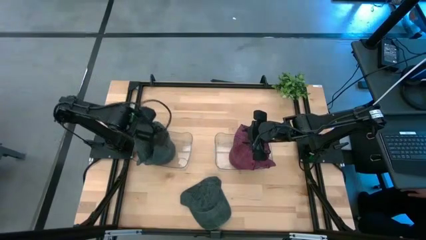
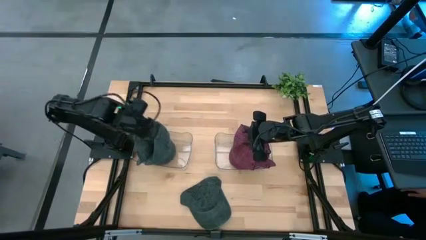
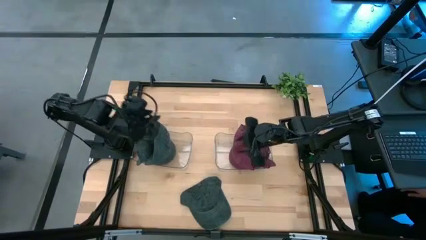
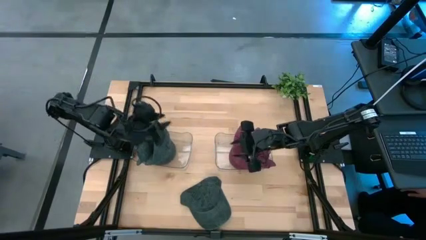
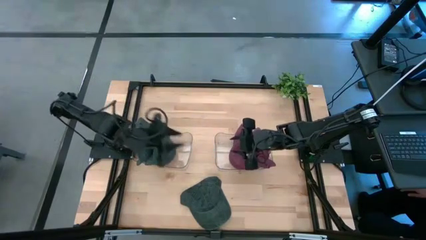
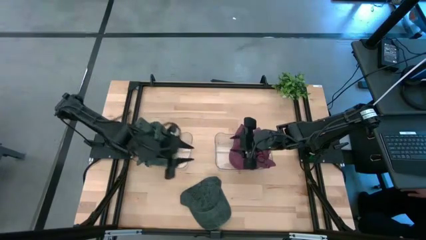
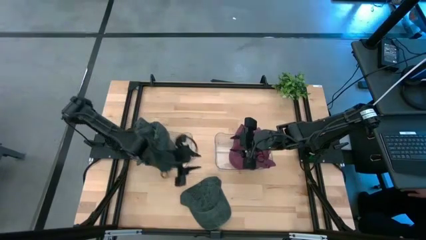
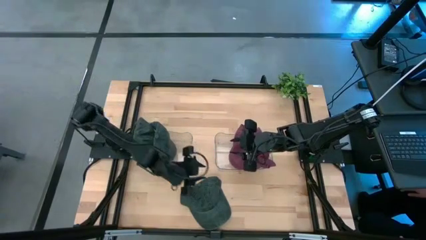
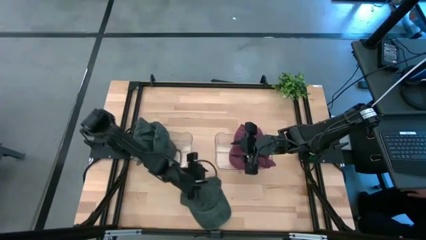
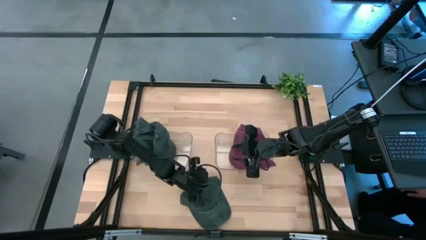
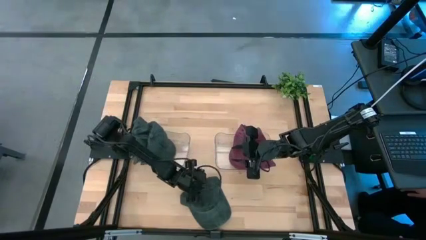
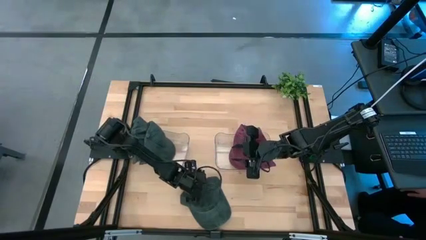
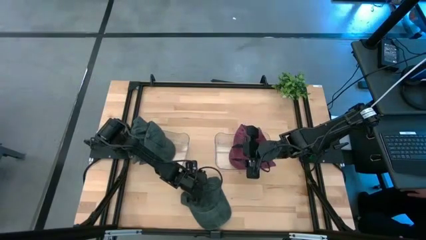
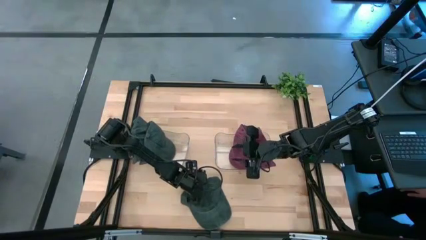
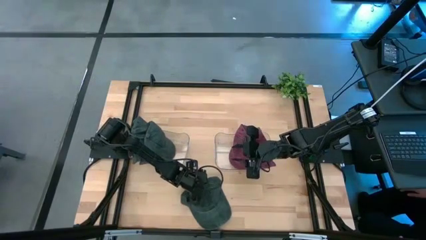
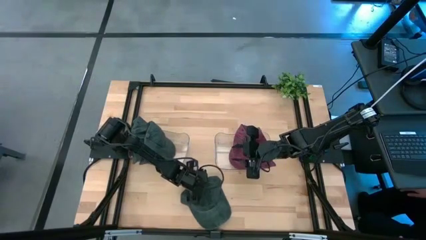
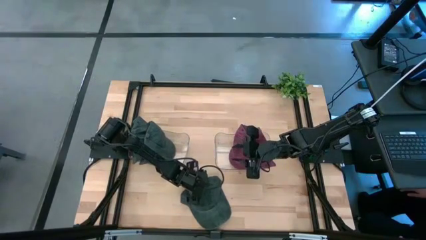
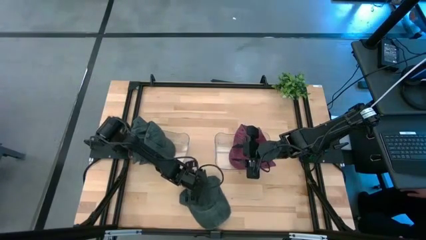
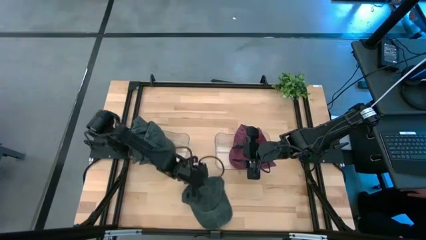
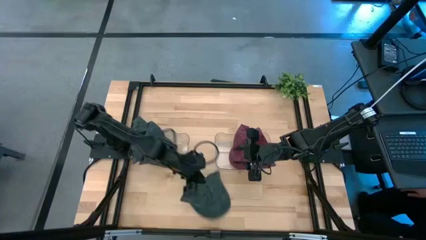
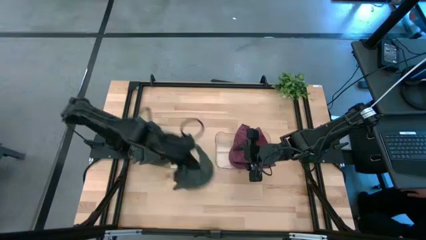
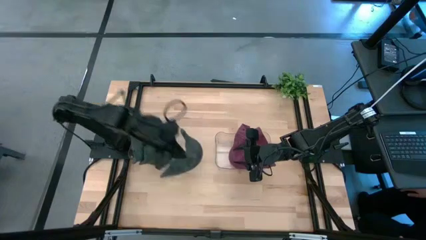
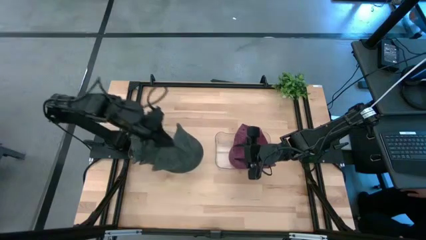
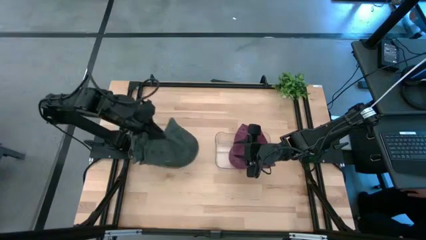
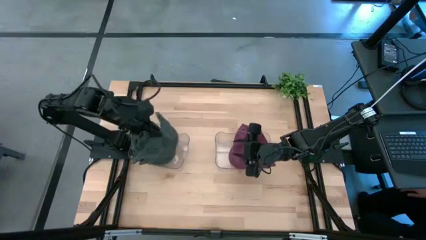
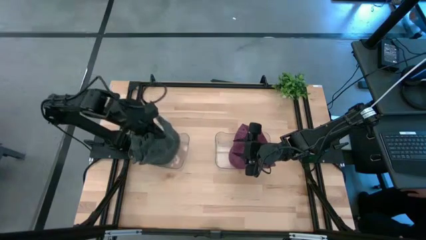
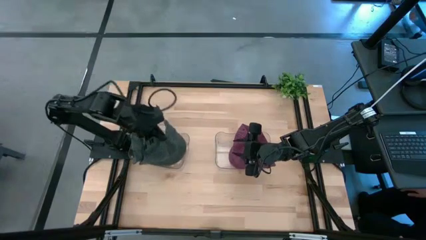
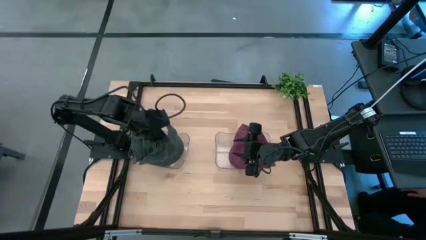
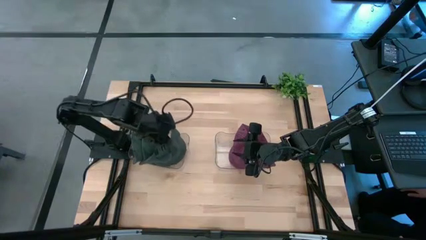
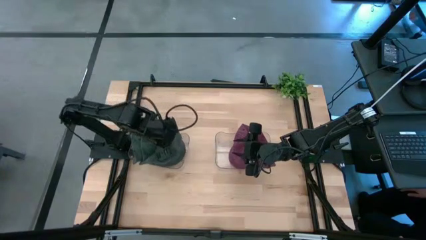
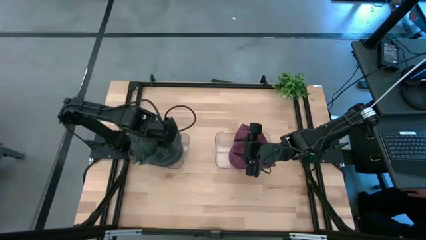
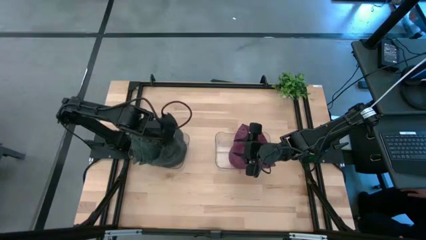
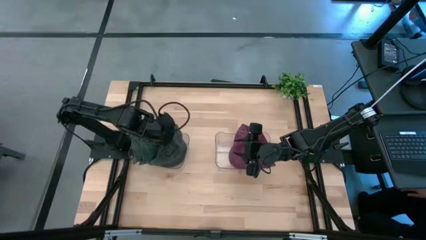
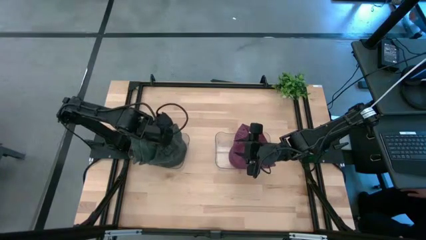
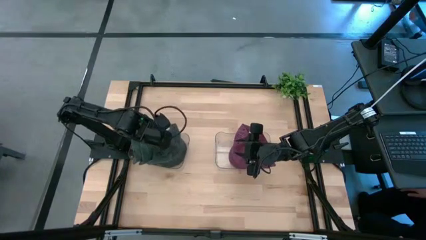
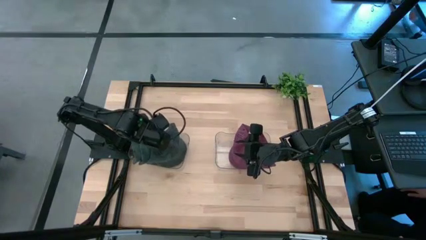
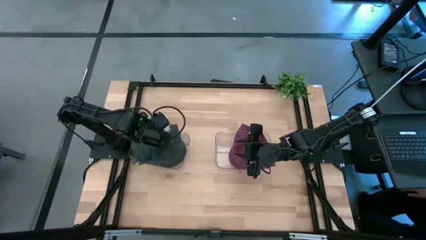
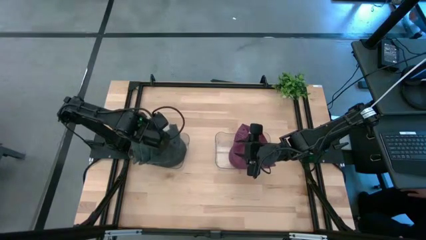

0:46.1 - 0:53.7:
Task: Pick & Place hat
Put the black cap into the left transparent bin

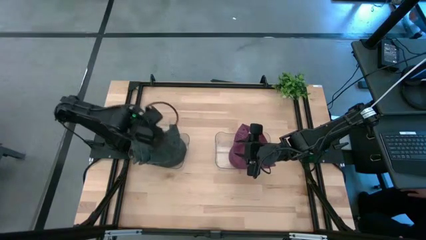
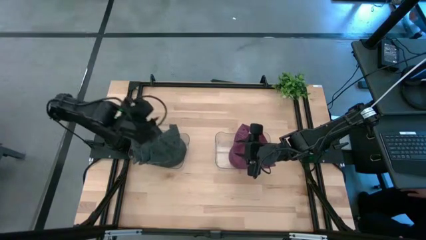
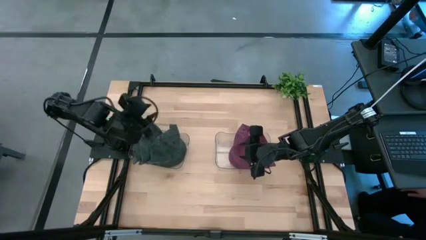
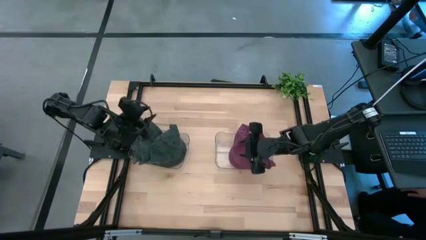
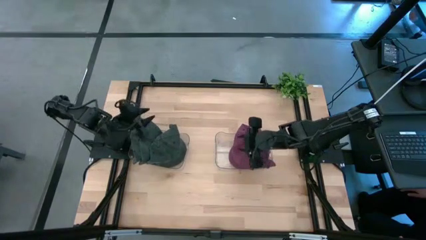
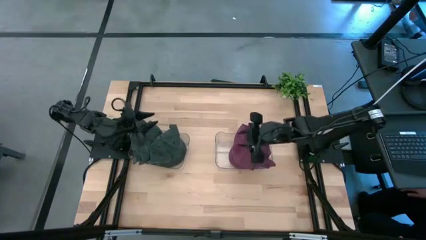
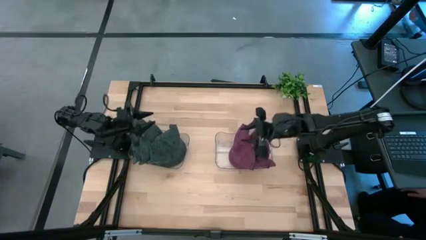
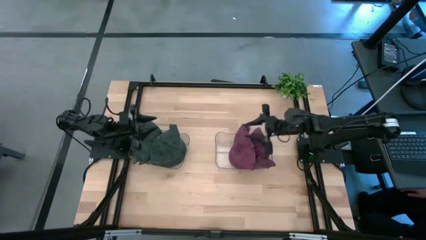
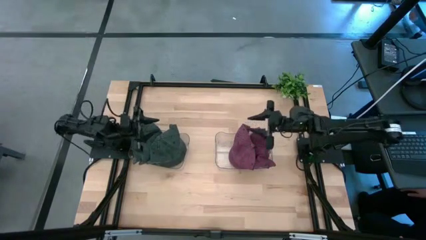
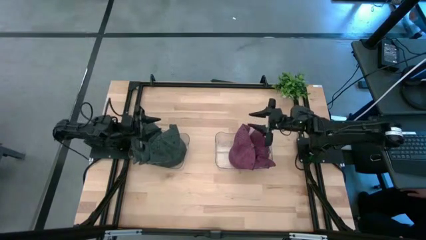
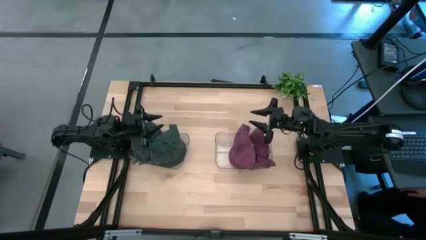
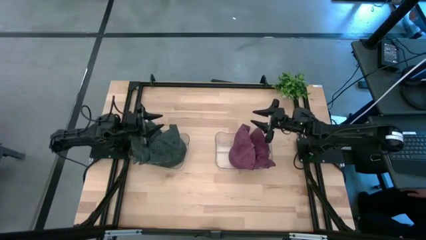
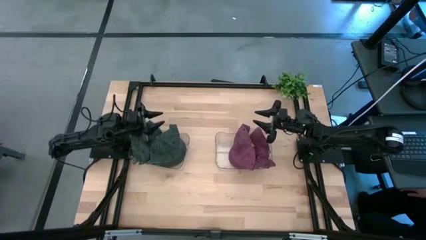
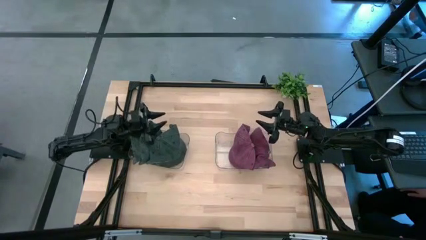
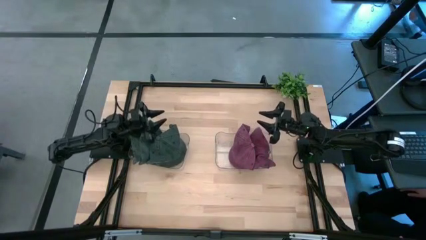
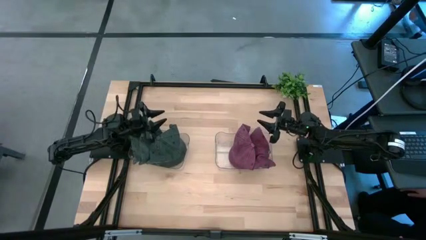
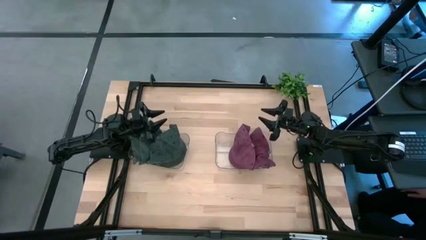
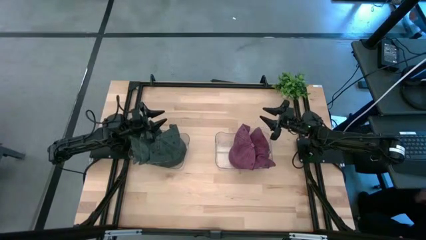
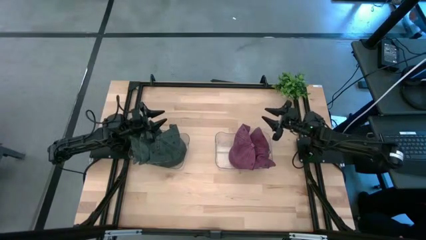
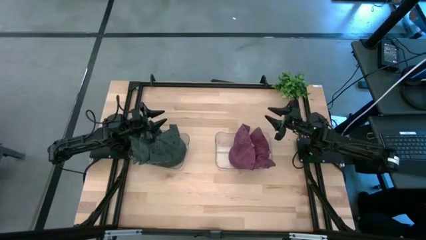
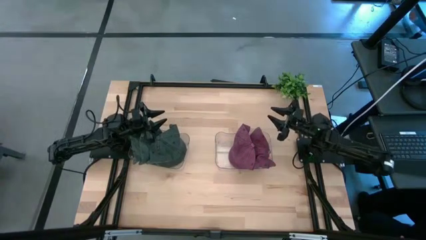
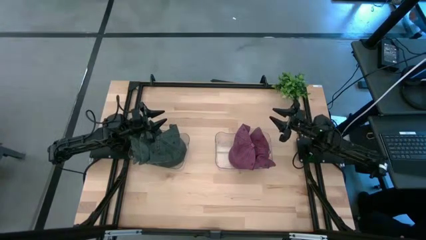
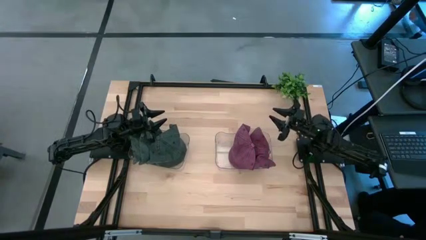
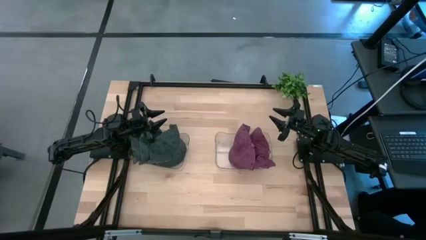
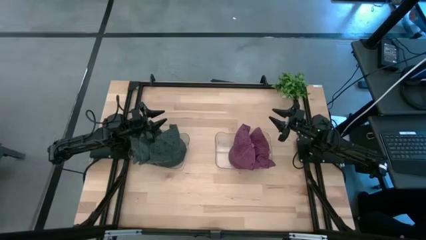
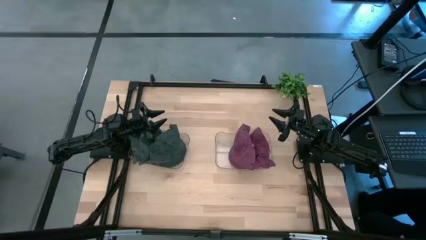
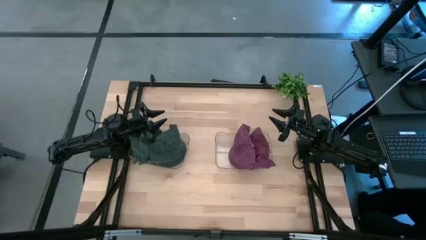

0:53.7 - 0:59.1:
Return to Home Position

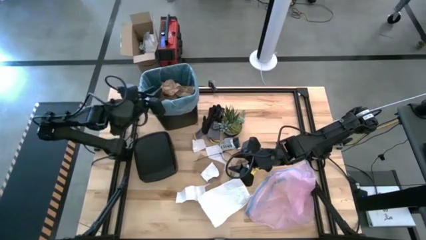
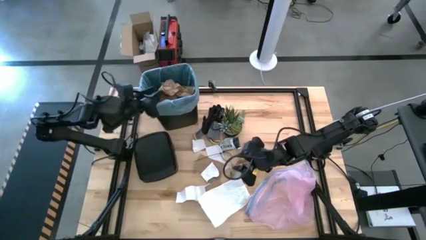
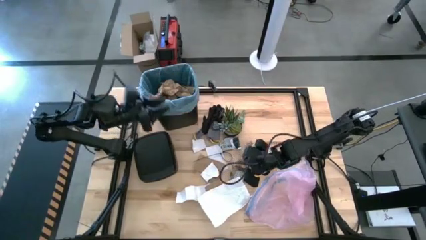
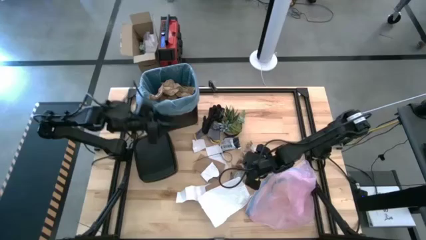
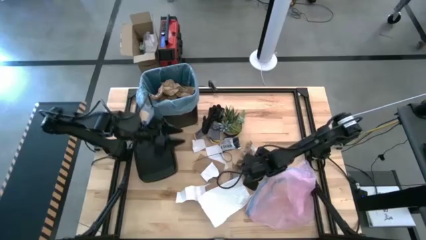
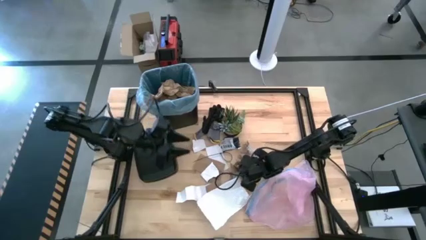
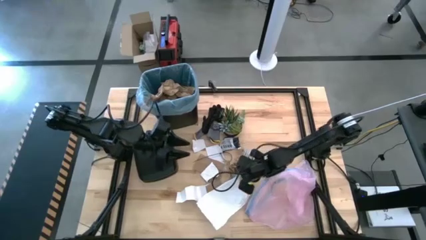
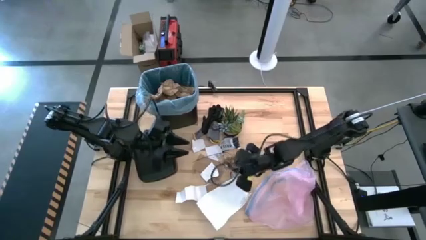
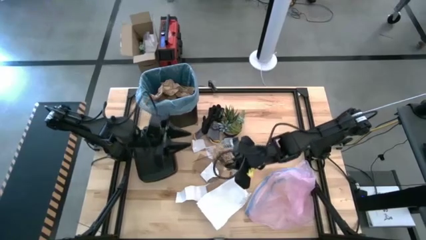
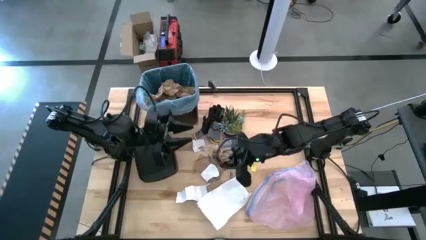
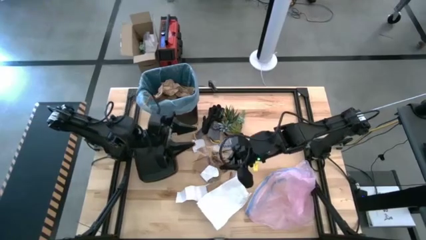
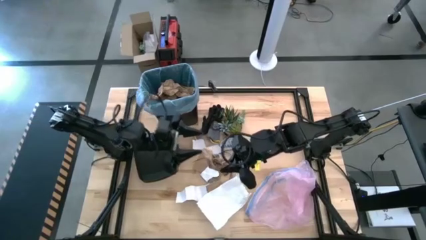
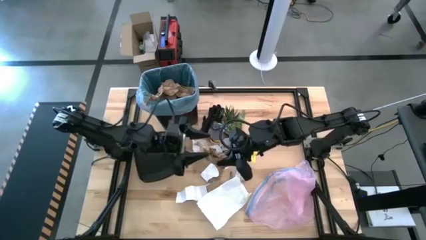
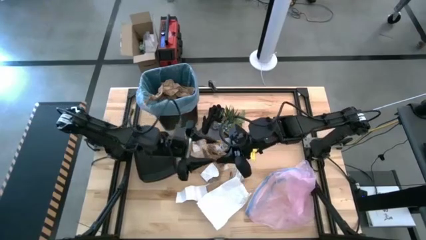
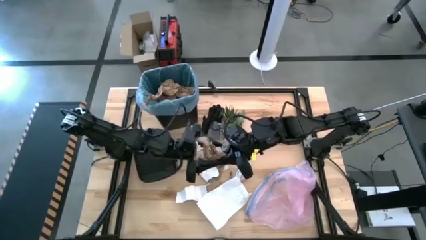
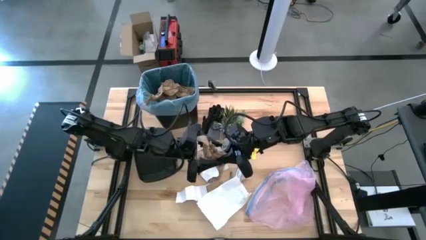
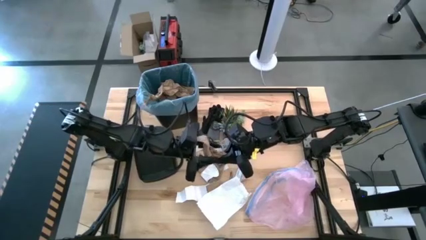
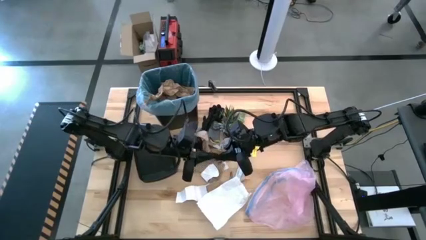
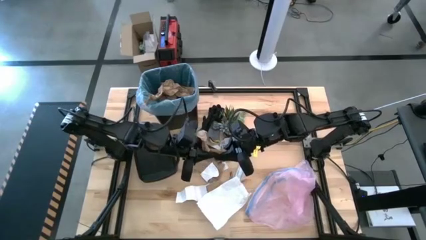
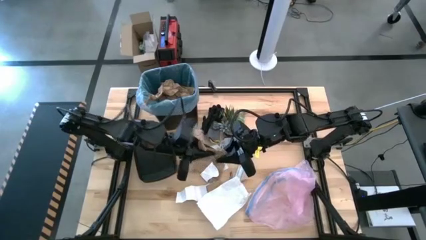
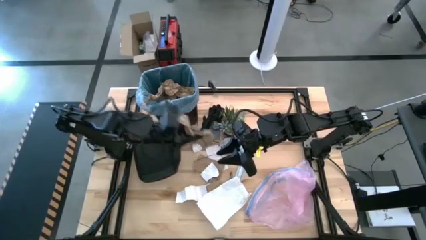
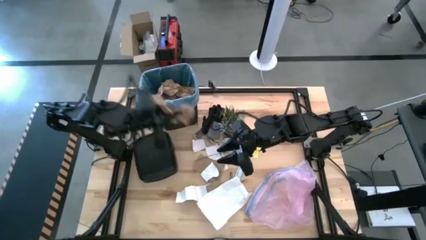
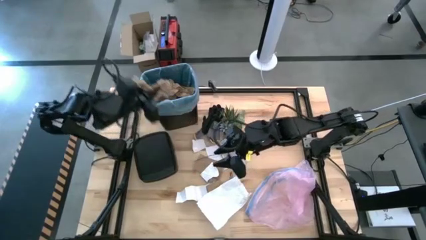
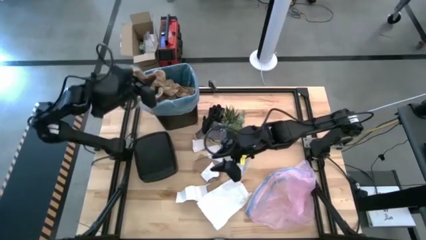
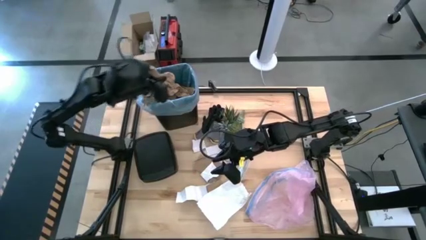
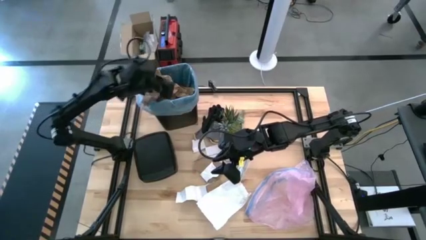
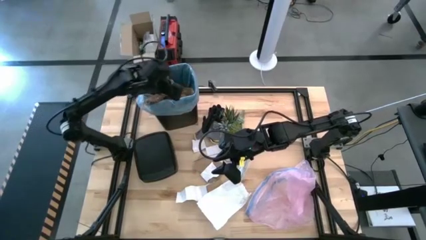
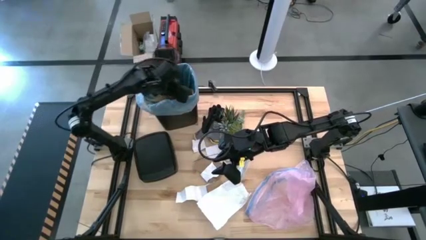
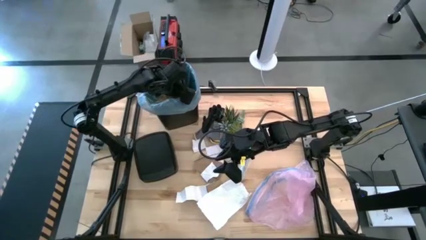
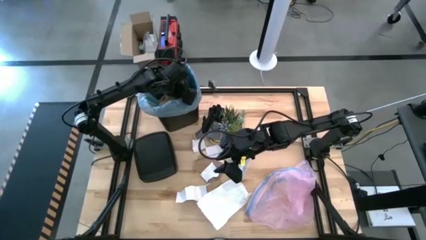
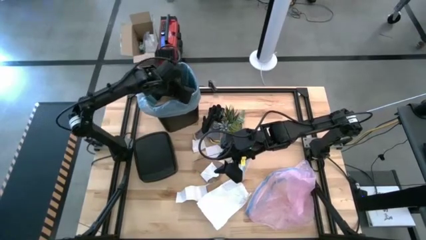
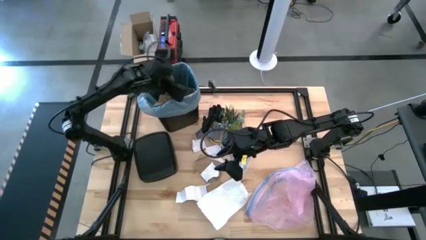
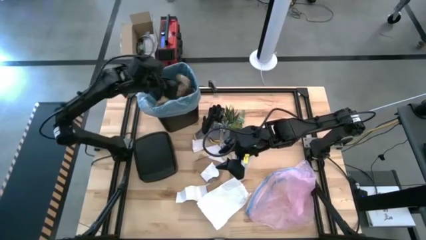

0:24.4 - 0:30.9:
Task: place trash/remove bag and relplace
Put the brown napkin into the trash bin
